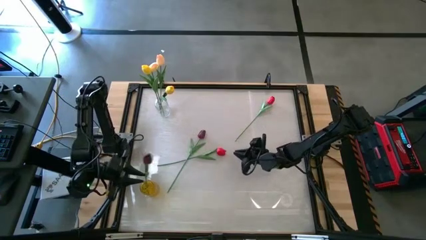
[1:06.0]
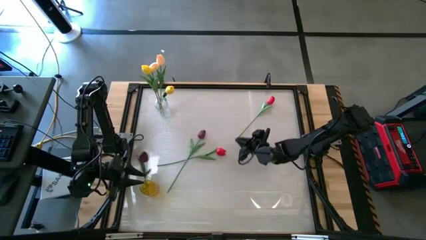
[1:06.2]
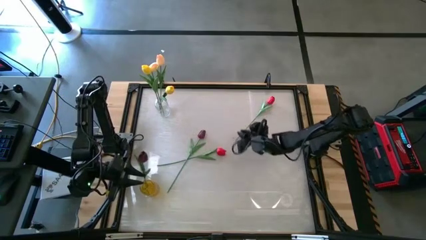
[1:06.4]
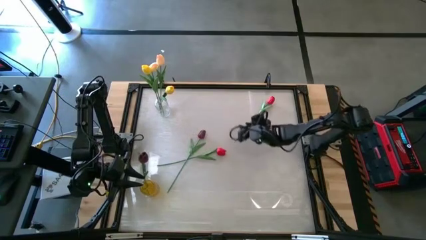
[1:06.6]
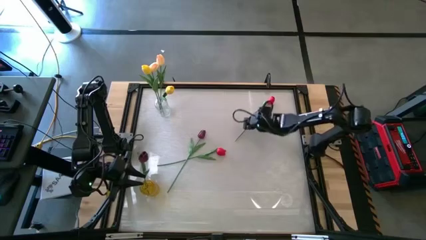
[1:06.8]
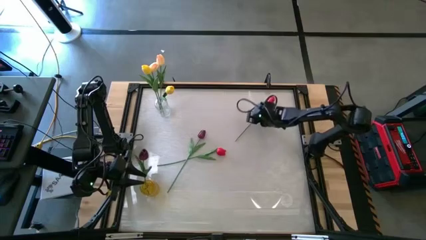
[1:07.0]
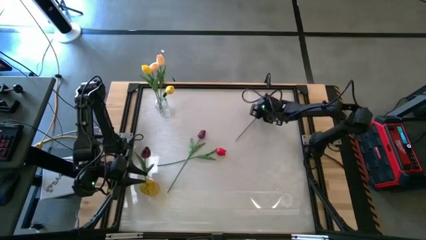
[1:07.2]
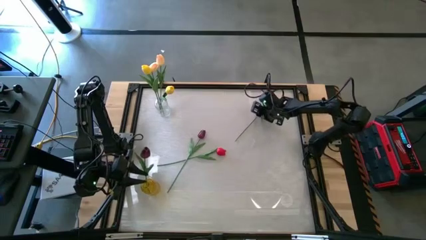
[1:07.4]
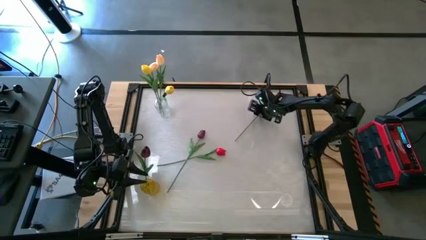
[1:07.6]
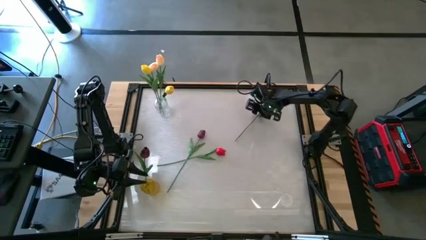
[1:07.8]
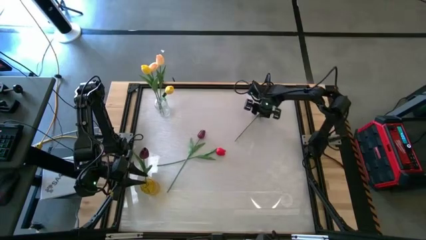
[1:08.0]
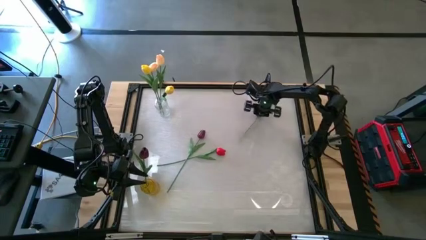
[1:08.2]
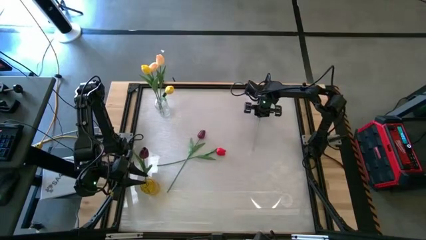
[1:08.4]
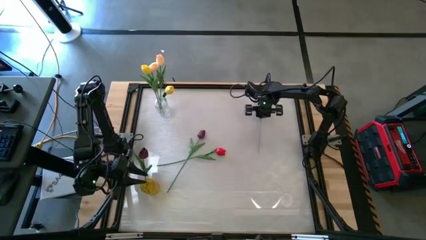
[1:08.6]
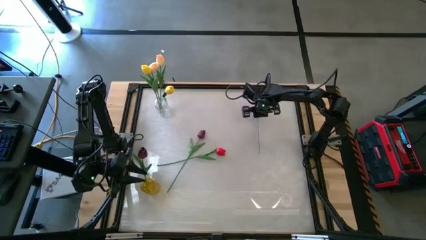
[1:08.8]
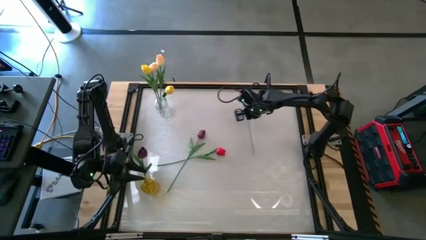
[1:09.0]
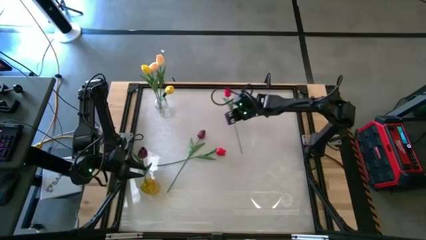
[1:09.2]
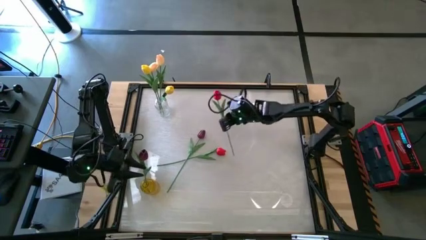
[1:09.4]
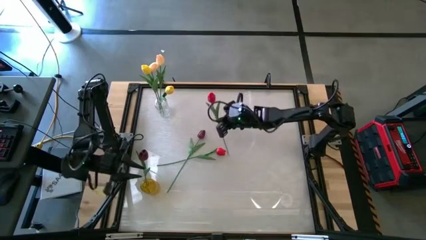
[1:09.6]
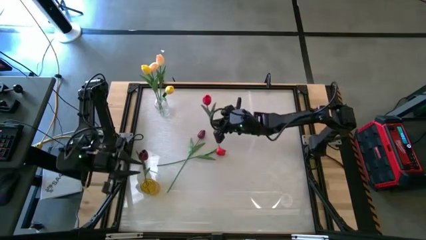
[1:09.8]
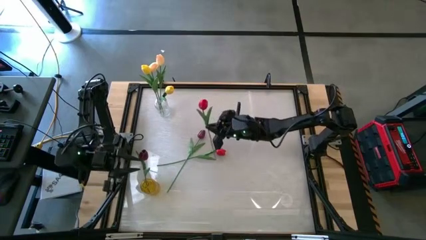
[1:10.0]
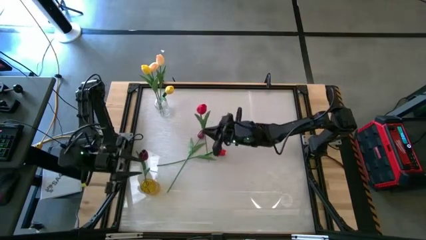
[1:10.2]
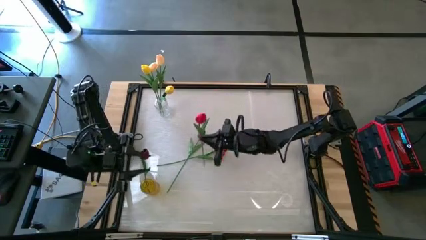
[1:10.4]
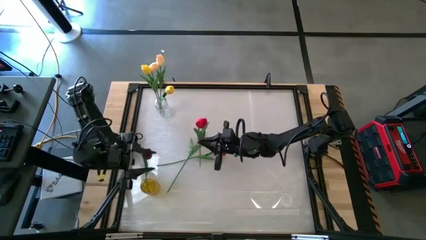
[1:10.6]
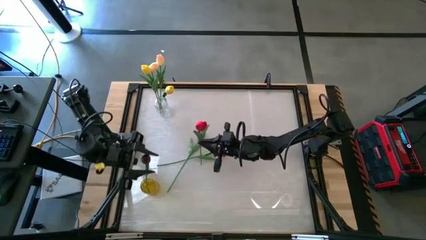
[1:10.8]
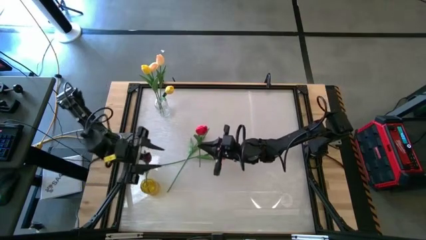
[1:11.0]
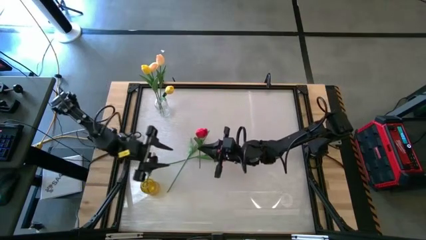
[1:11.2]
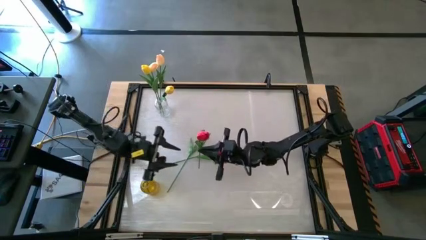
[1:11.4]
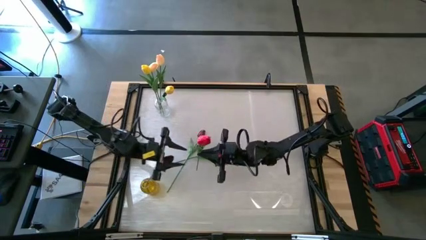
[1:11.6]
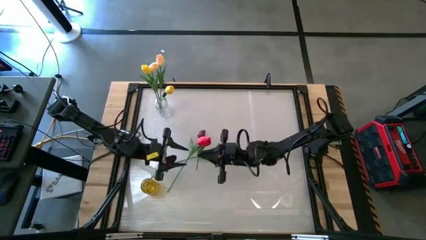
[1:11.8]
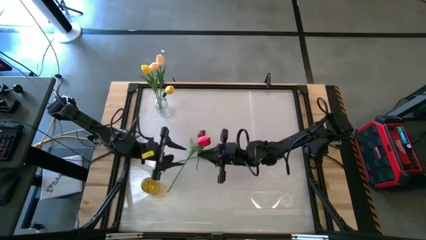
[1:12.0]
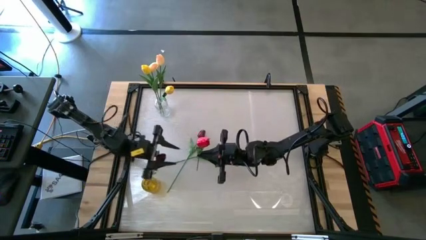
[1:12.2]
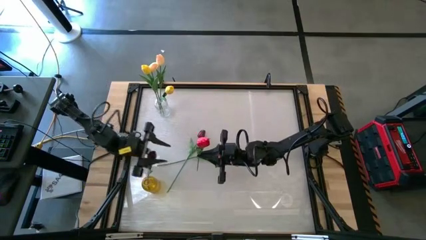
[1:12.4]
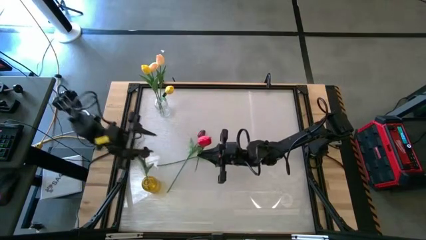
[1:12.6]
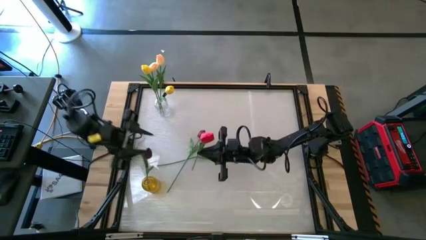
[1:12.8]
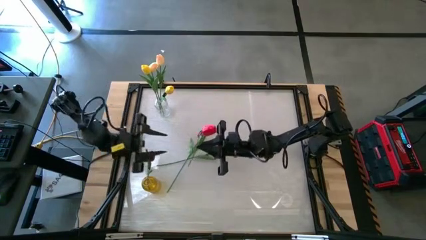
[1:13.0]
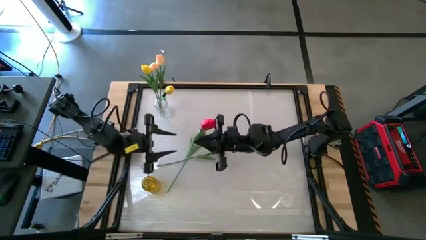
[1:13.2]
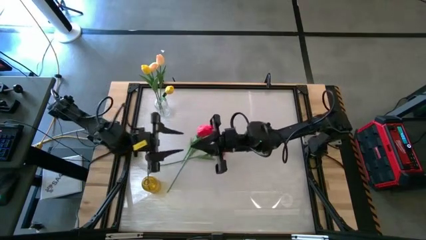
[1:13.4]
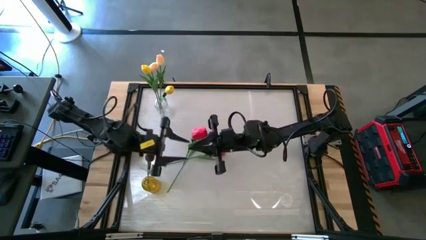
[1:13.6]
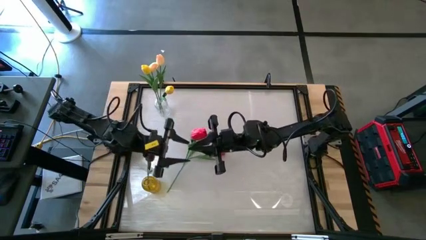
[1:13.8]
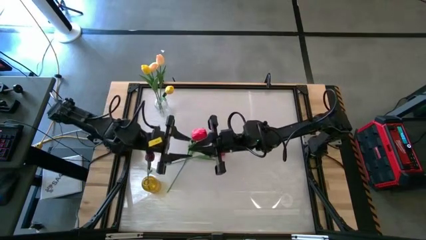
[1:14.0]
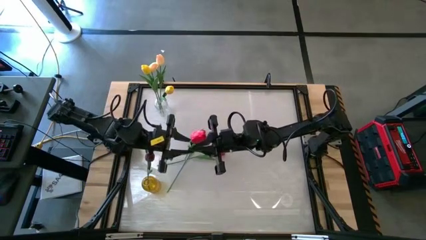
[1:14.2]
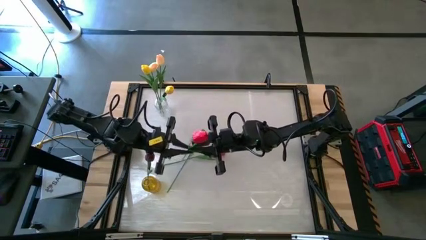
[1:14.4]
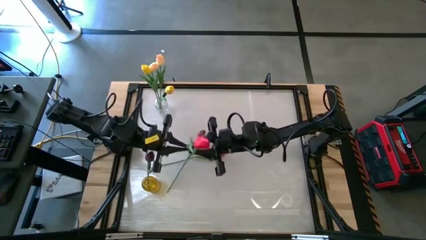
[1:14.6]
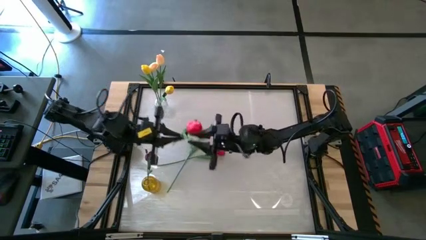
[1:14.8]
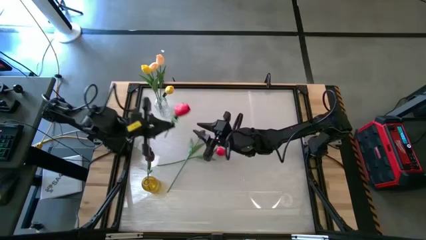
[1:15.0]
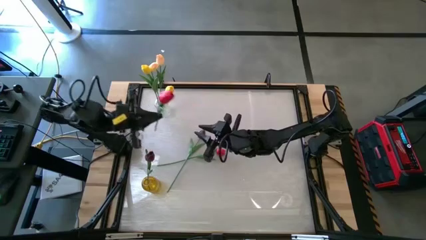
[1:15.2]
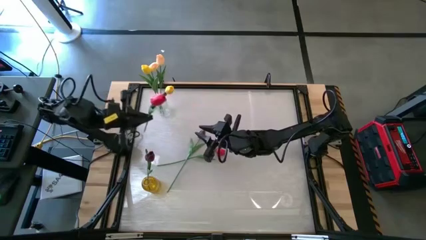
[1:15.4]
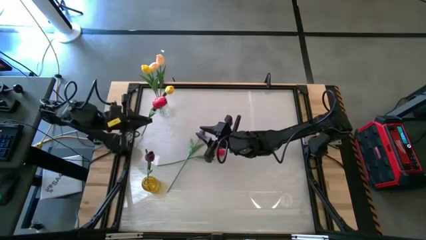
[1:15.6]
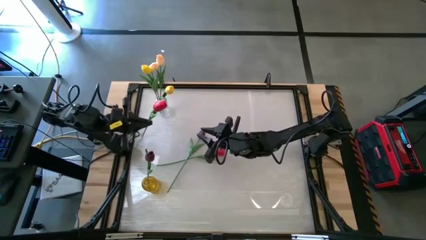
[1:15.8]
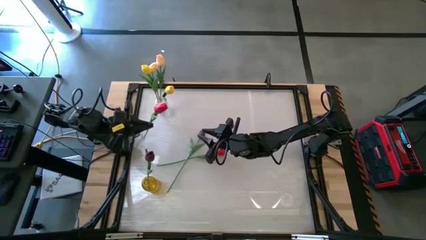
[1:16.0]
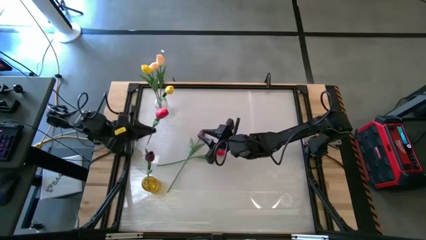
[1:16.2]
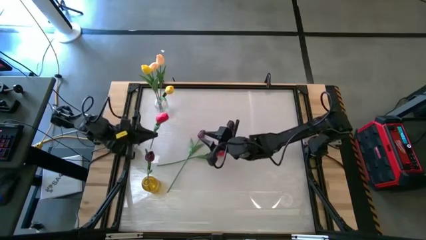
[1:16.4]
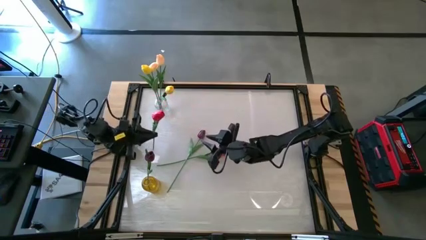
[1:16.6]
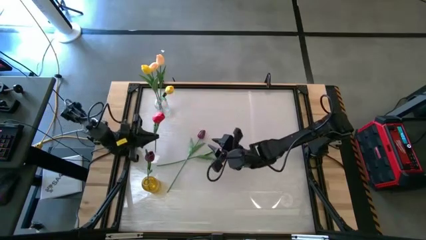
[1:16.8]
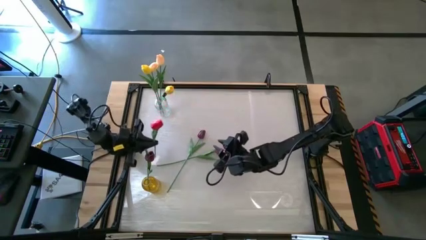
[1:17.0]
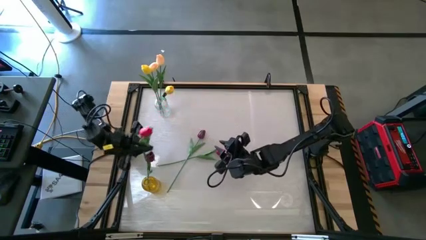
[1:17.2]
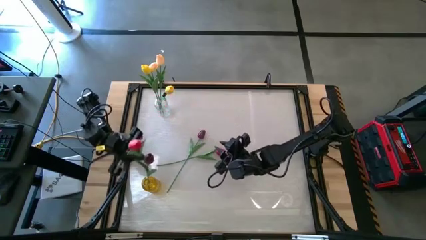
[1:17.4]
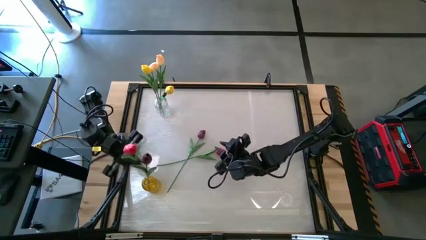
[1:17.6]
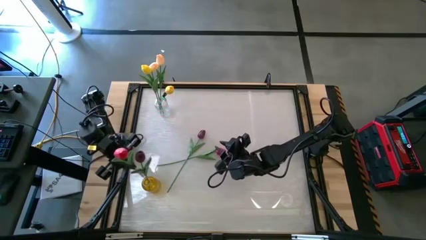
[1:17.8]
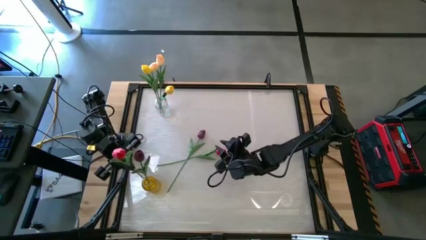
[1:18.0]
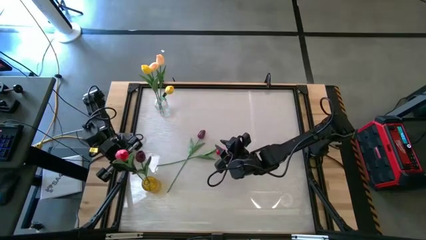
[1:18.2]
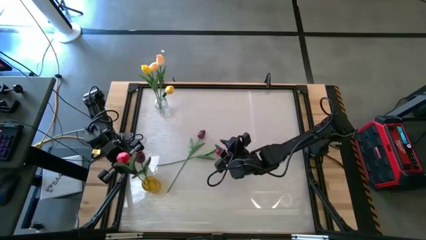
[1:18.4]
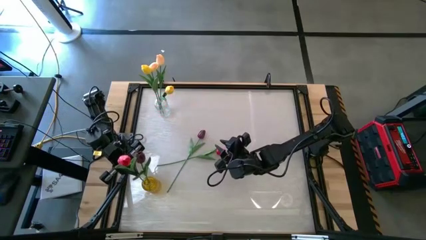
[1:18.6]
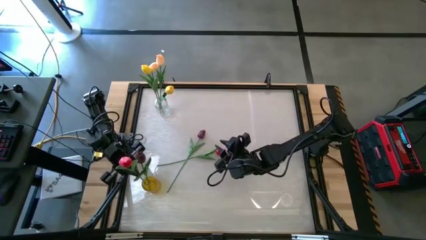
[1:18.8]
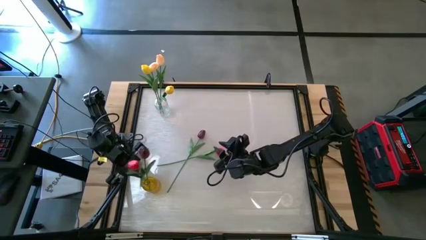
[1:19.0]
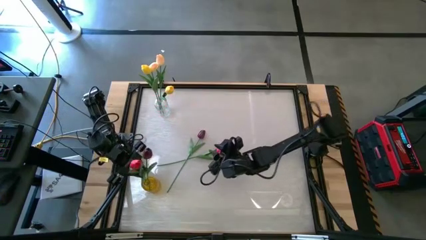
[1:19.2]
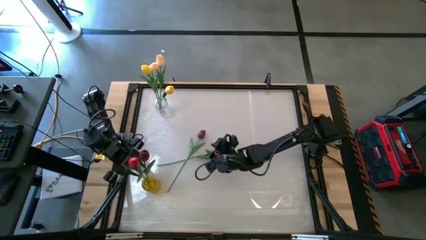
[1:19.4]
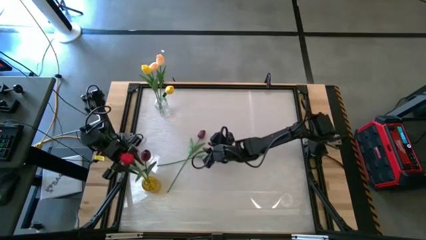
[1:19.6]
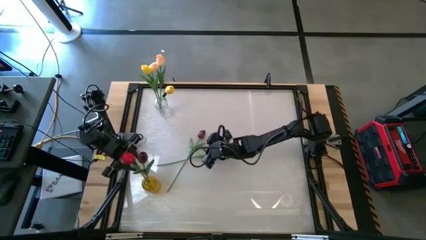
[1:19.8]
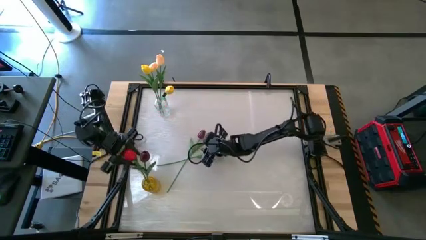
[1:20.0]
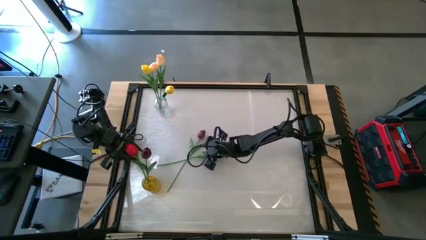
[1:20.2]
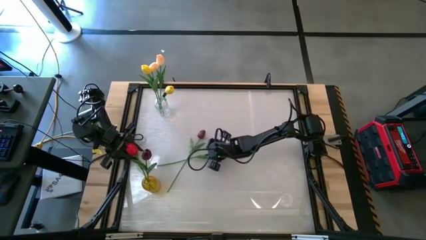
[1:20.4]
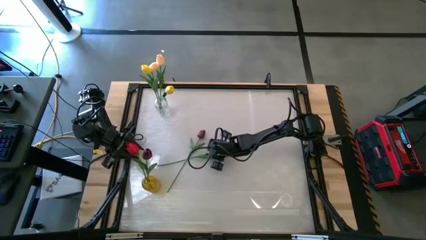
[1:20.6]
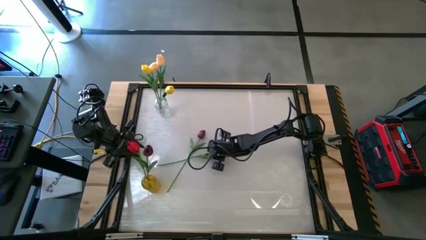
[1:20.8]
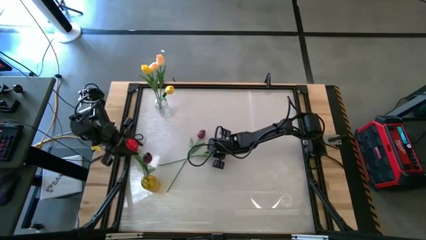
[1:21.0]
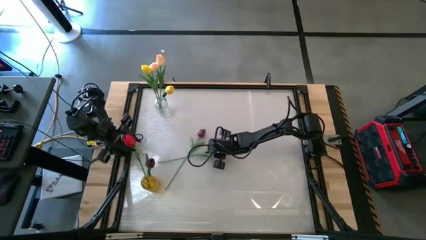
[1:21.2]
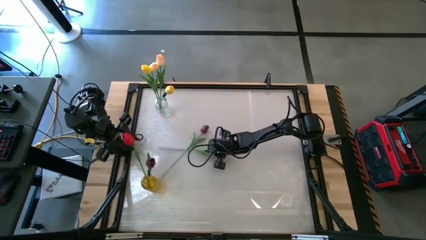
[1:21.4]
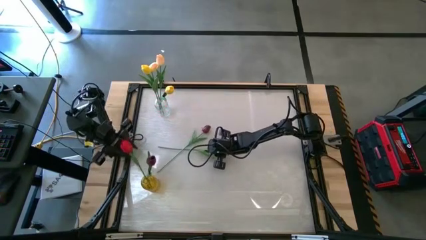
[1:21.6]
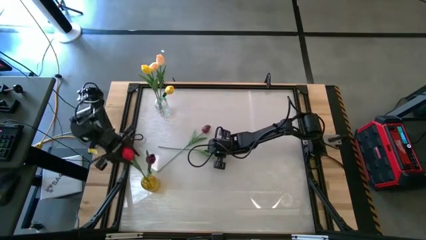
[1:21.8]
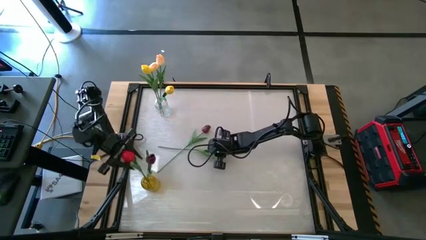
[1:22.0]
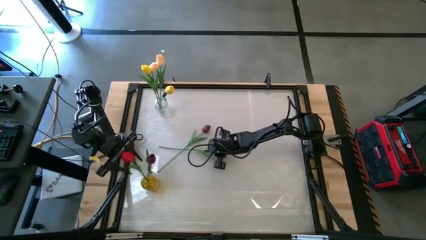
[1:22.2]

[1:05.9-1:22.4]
Task: Sort flowers into vase by color
Put the red tulip into the orange vase

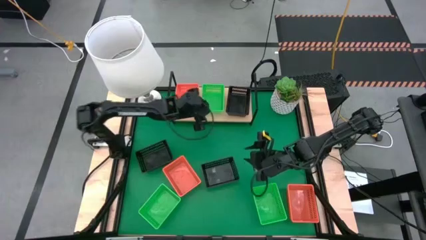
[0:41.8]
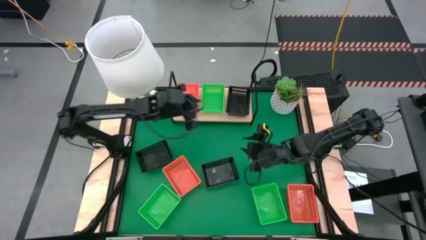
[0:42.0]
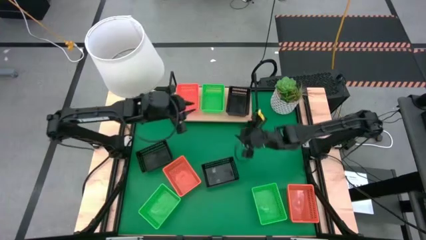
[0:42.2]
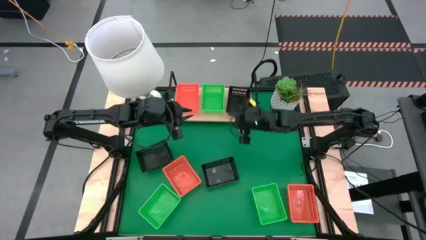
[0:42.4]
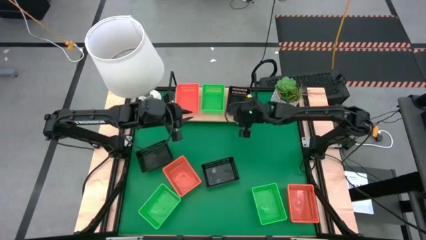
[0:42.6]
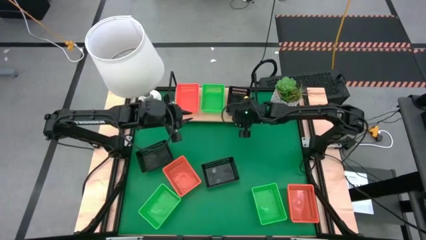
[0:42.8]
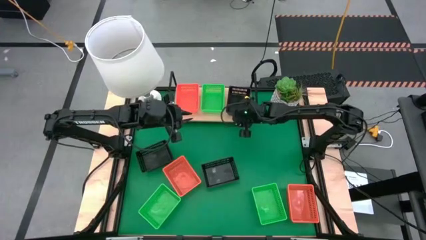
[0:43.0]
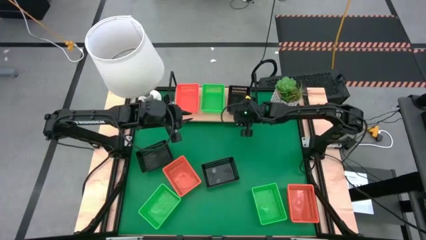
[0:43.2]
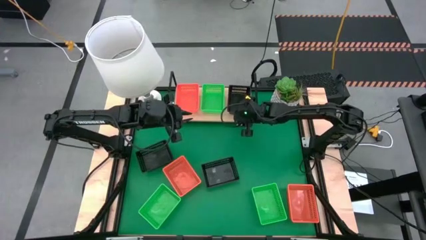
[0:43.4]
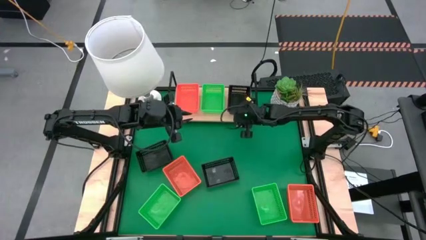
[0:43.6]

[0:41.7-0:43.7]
Task: Stack baskets on shelf by color
Adjust the black bin on the shelf
